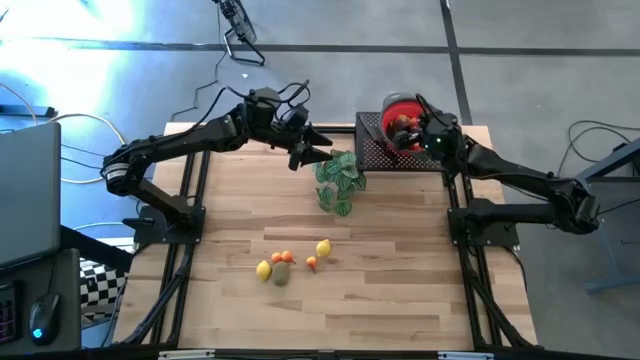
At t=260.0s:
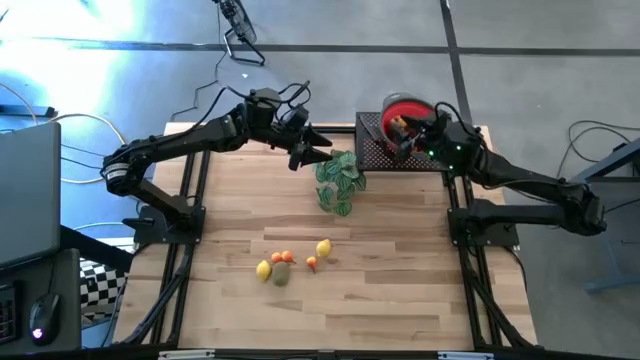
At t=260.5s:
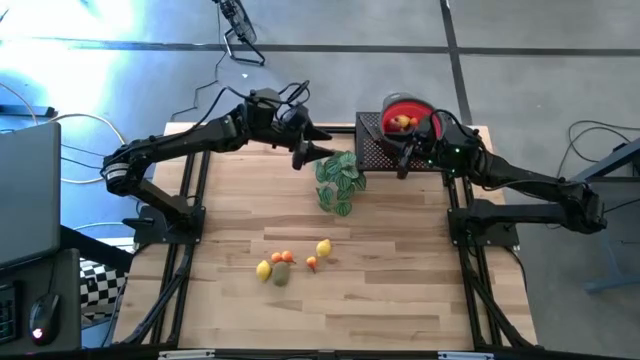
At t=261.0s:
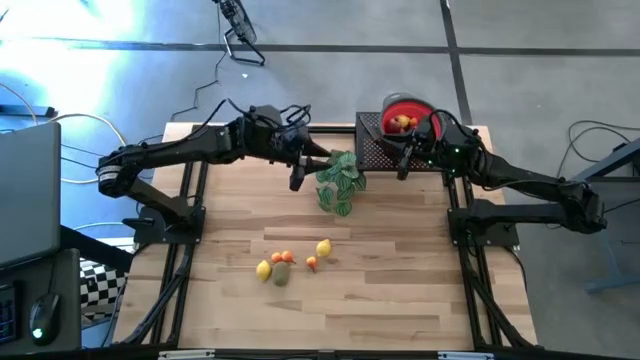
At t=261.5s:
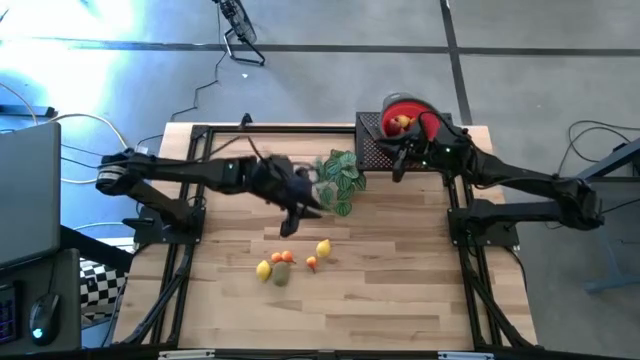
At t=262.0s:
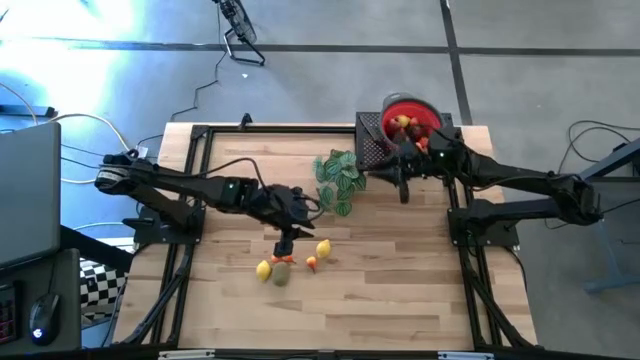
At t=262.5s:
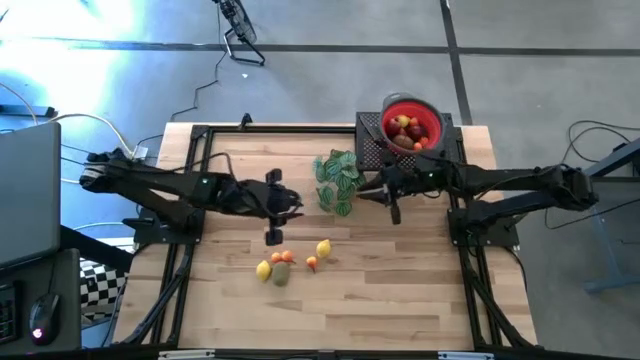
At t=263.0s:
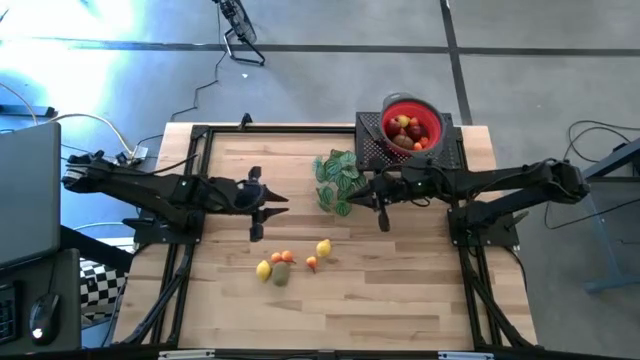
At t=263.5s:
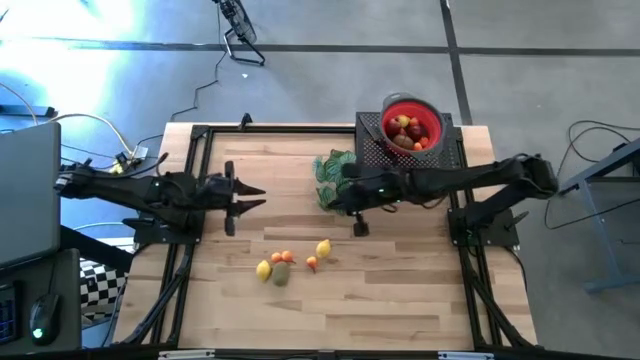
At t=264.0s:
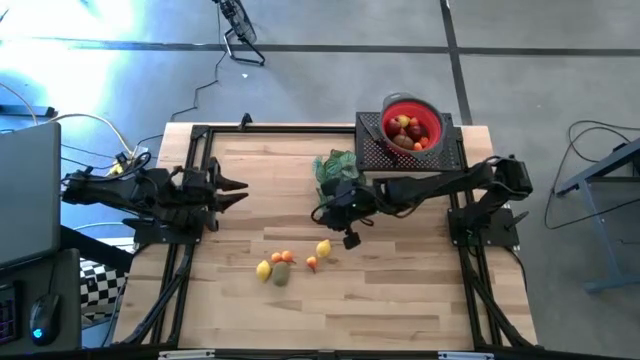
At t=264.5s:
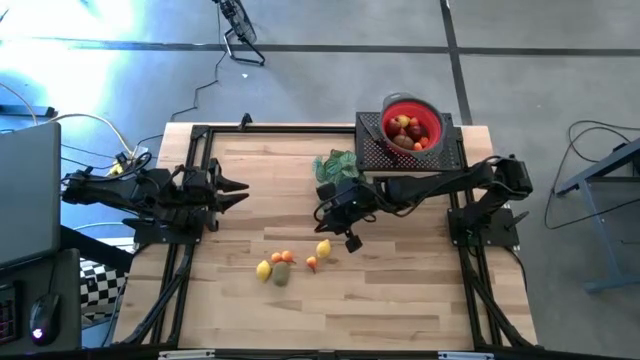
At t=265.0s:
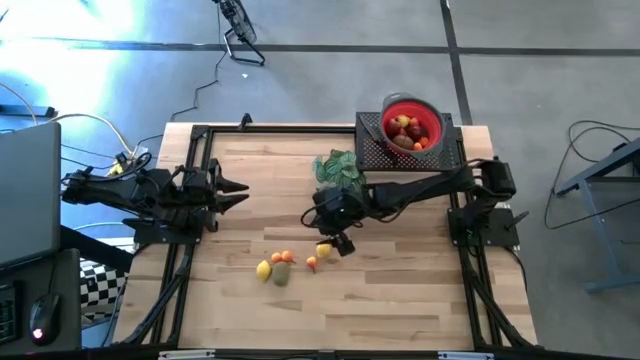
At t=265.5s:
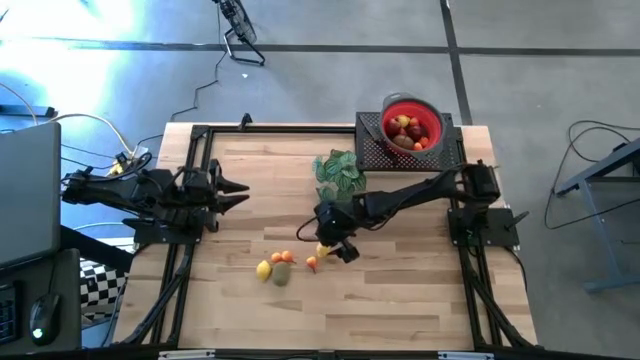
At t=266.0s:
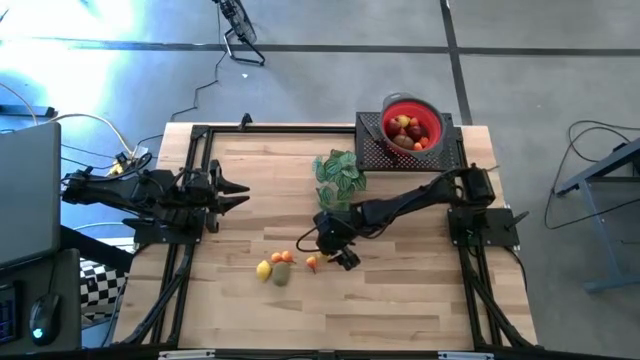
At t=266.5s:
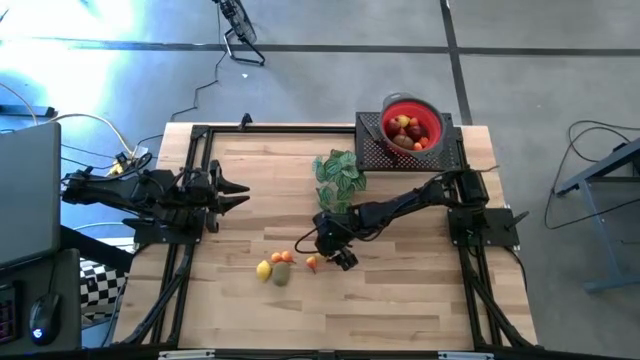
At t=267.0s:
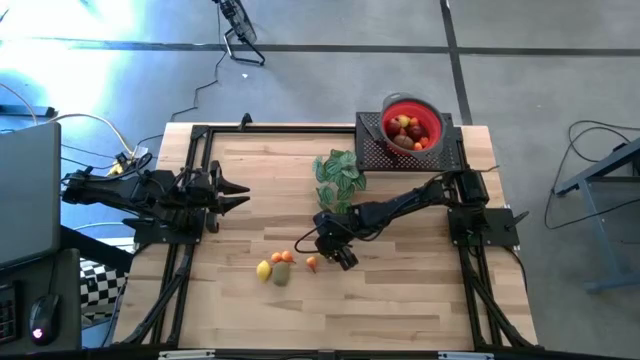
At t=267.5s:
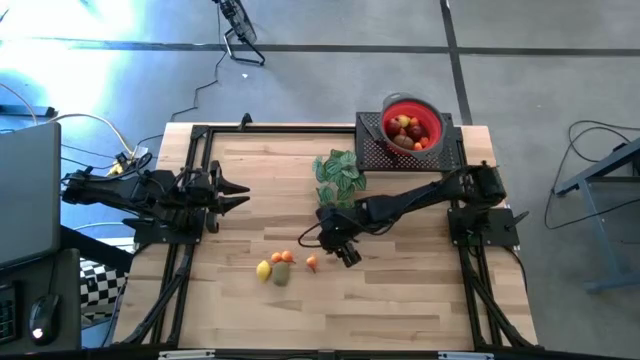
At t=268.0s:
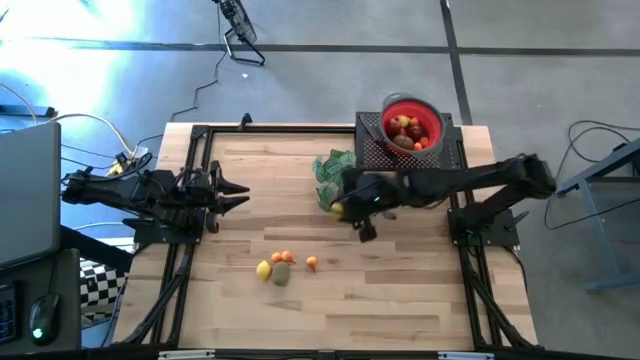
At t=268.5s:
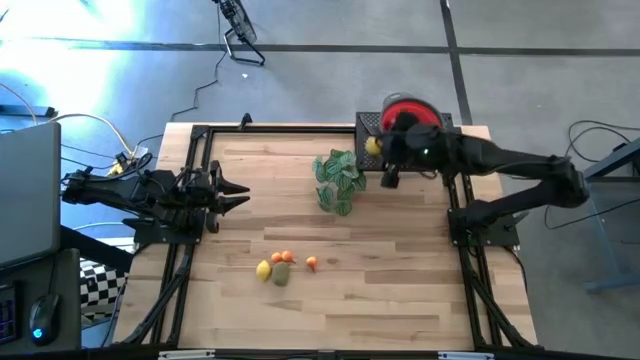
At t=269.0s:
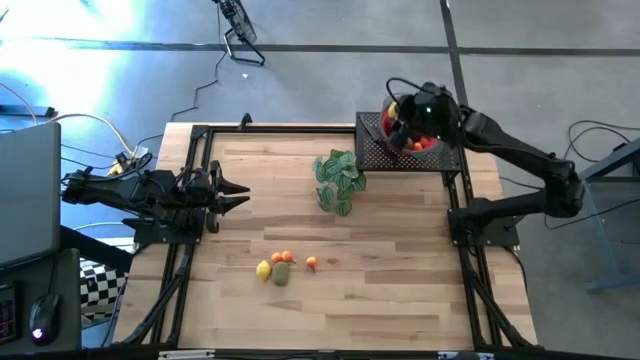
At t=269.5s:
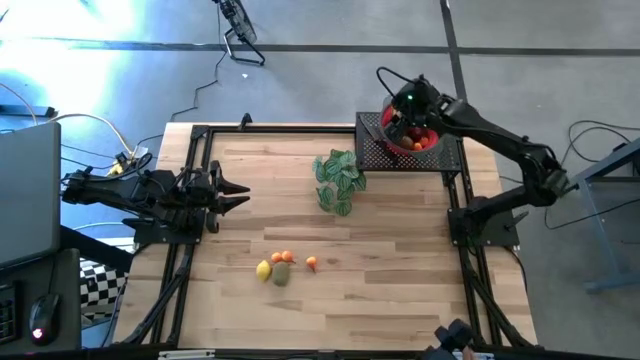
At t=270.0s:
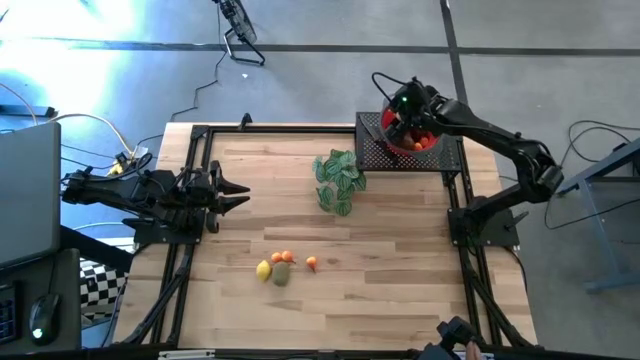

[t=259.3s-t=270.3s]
Task: Pick & Place Fruit
Put the lemon into the red colander

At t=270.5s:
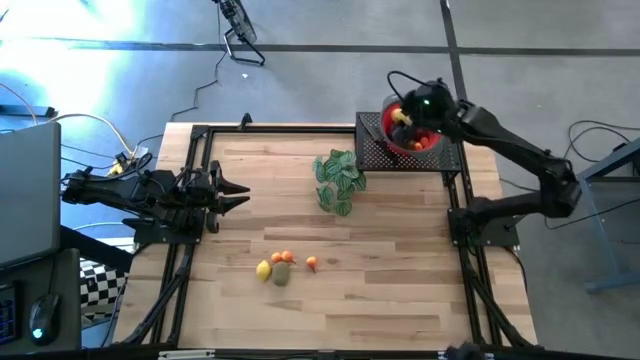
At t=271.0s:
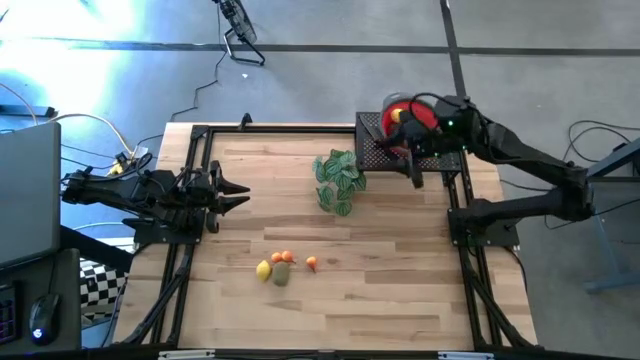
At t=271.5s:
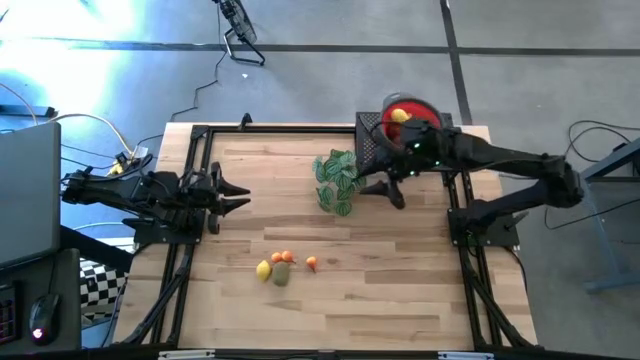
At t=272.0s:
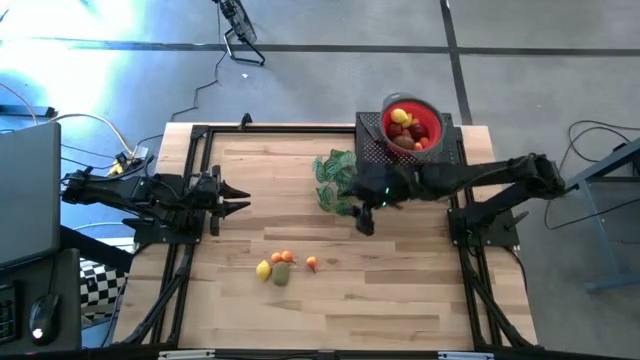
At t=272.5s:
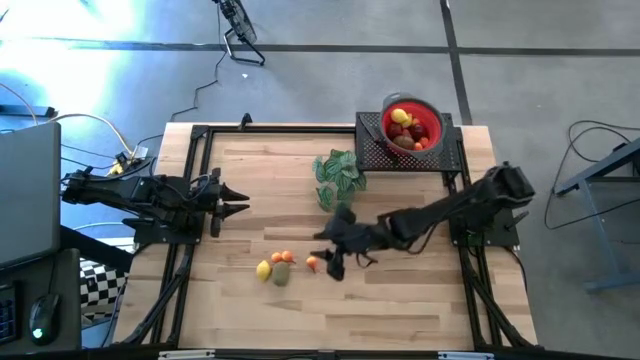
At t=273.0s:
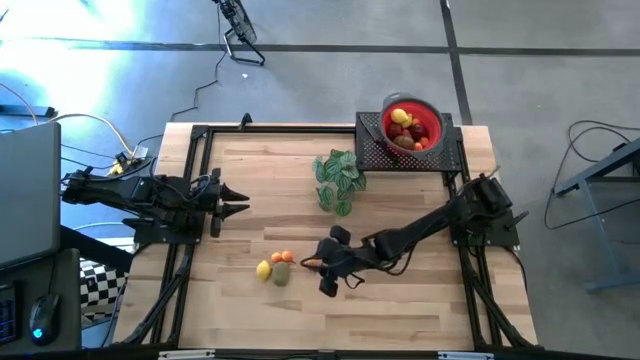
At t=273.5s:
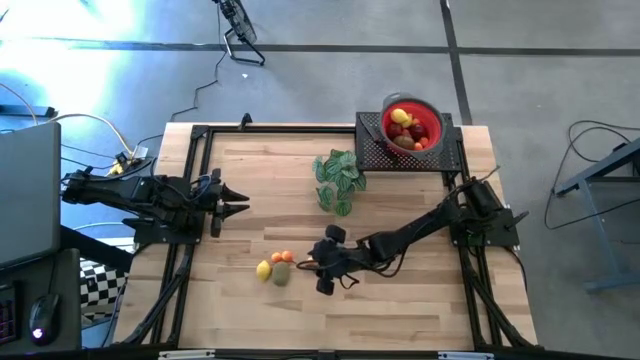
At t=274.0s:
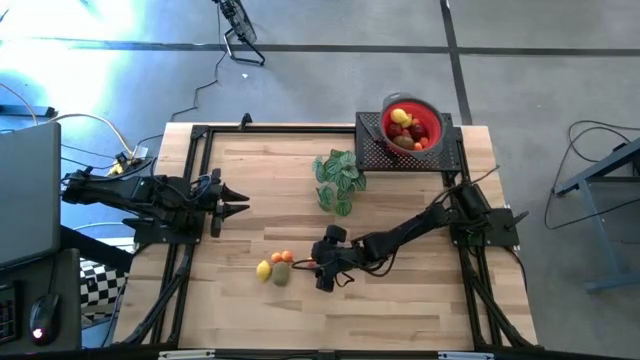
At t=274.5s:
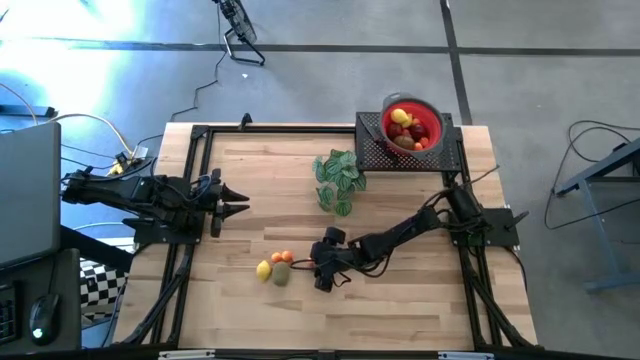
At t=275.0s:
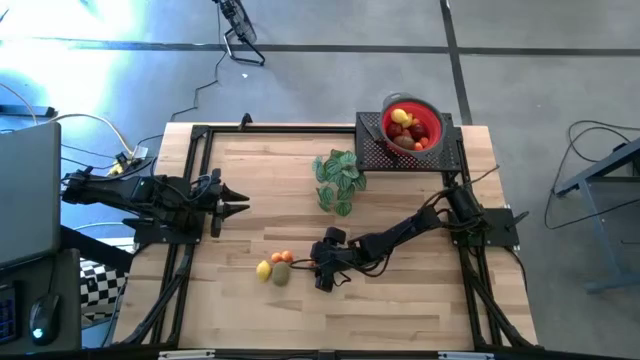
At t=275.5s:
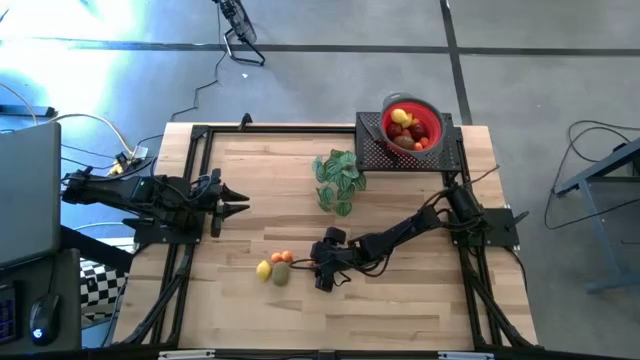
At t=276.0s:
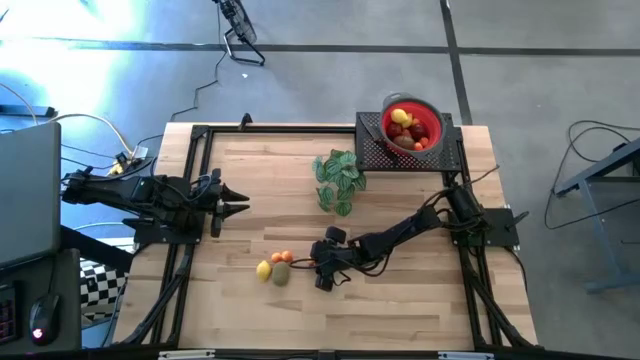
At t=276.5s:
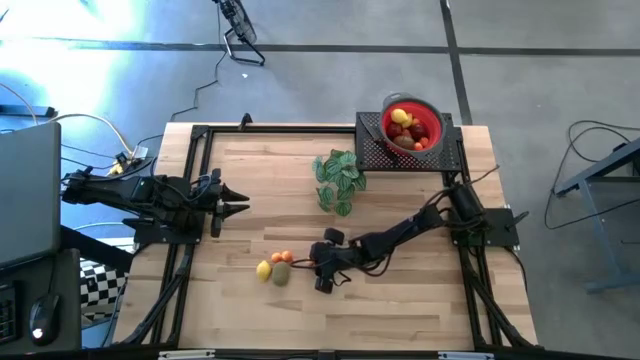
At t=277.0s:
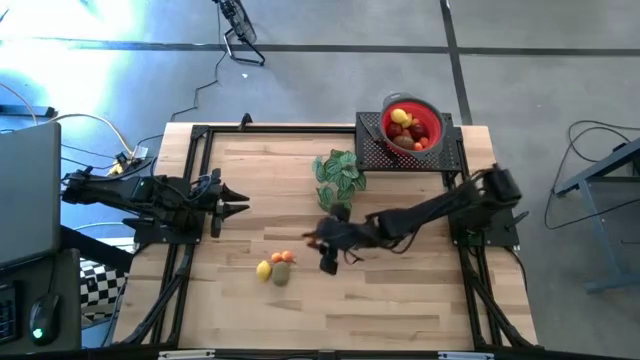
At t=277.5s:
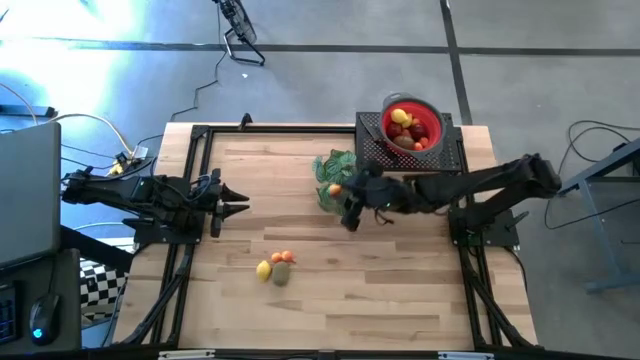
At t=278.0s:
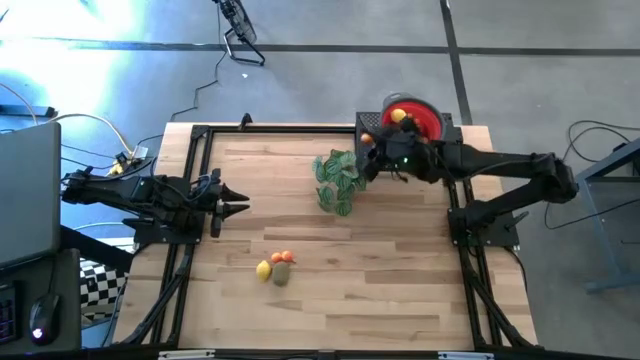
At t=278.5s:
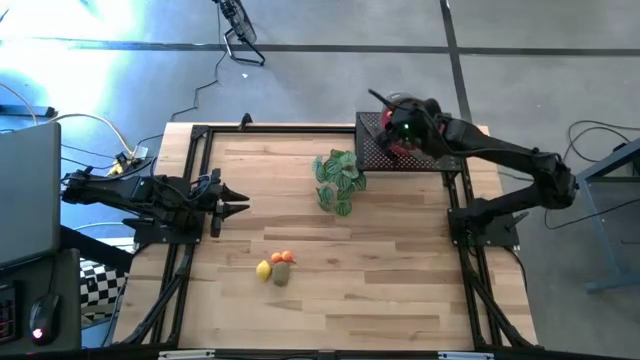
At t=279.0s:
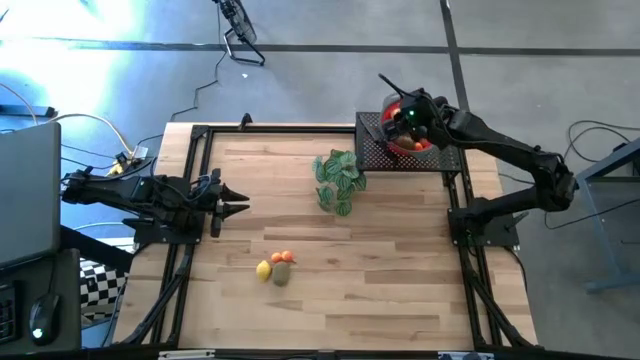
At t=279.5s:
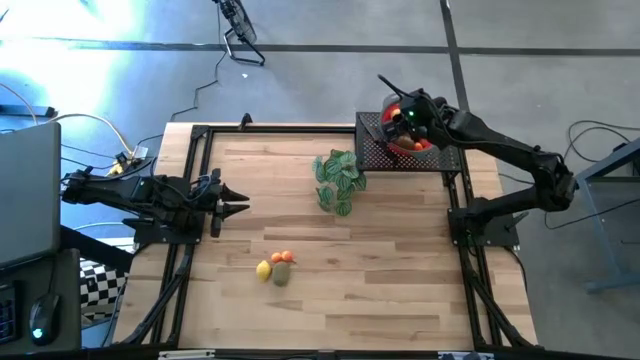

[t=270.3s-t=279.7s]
Put the orange pear into the red colander
